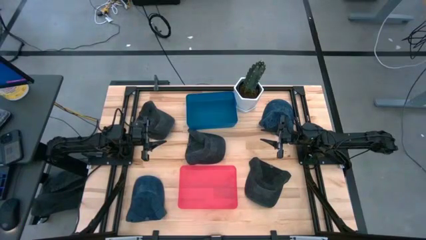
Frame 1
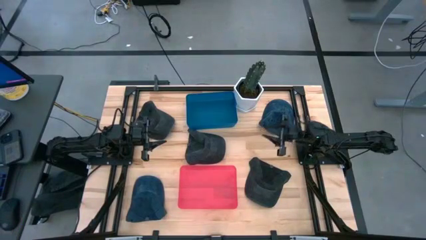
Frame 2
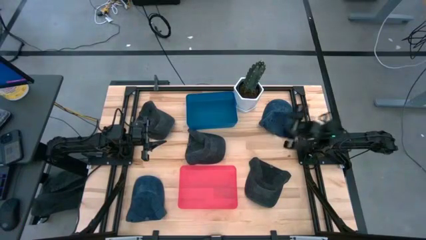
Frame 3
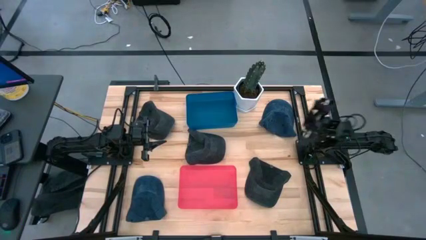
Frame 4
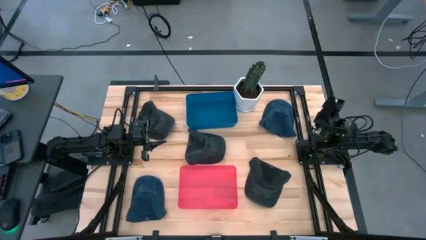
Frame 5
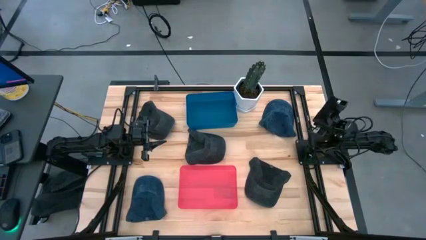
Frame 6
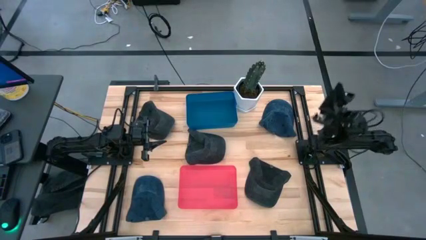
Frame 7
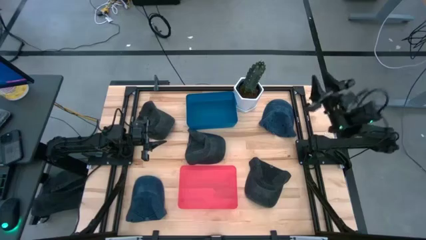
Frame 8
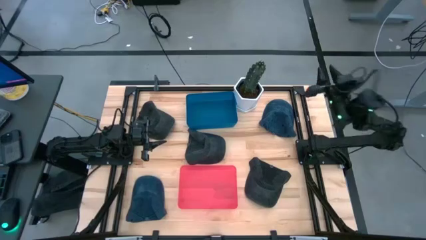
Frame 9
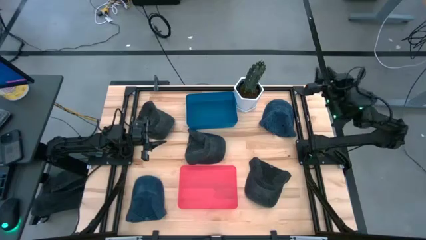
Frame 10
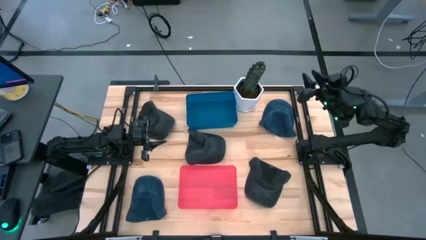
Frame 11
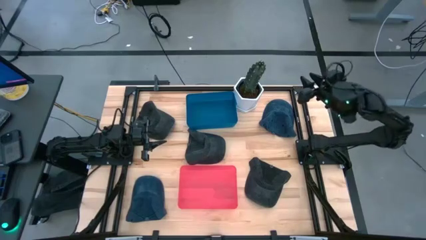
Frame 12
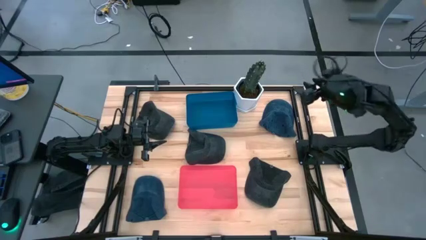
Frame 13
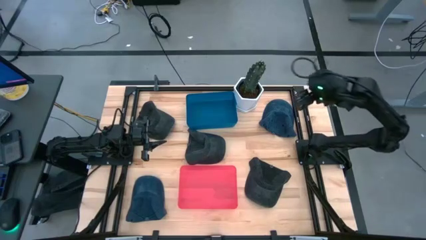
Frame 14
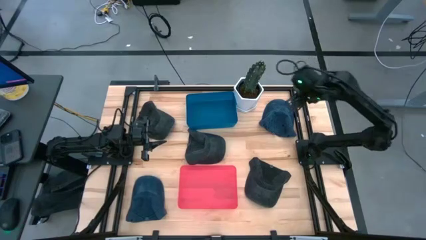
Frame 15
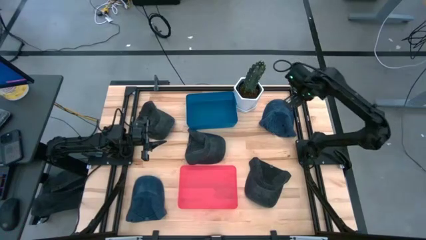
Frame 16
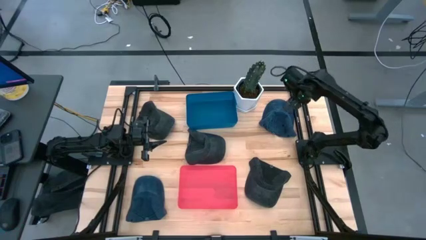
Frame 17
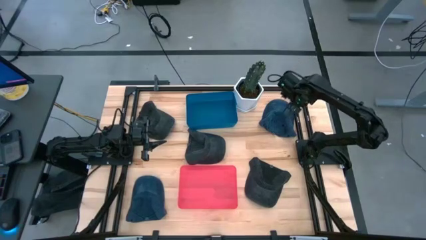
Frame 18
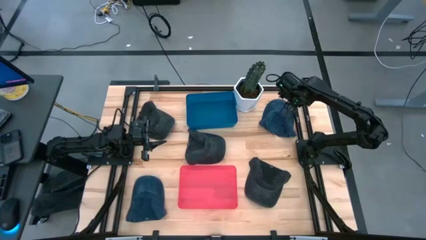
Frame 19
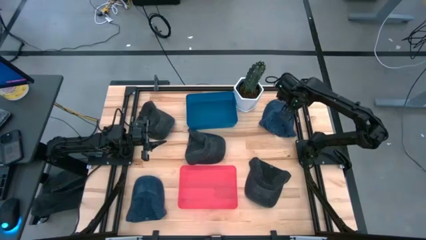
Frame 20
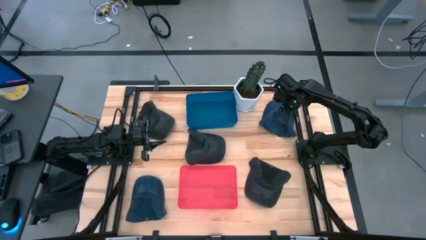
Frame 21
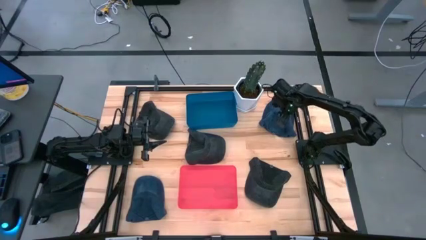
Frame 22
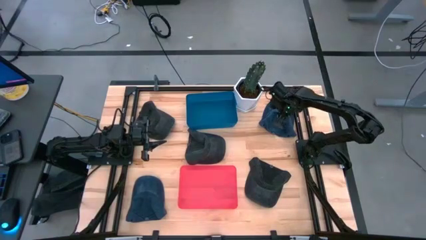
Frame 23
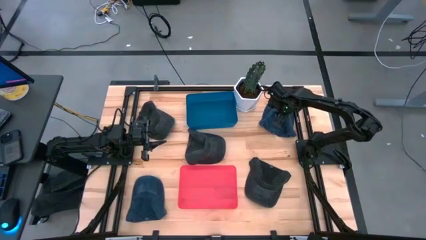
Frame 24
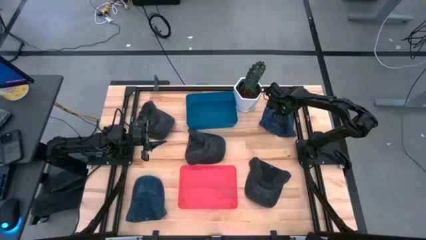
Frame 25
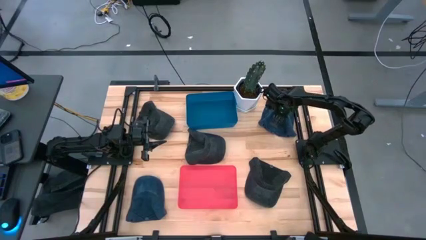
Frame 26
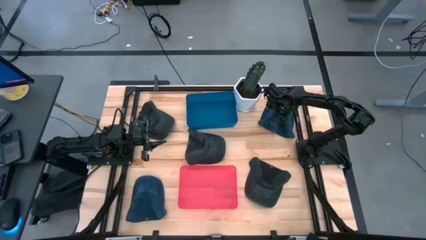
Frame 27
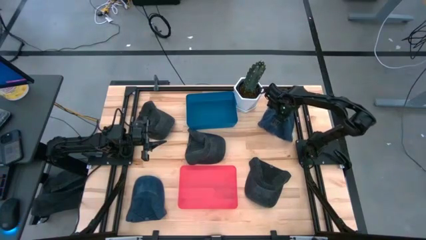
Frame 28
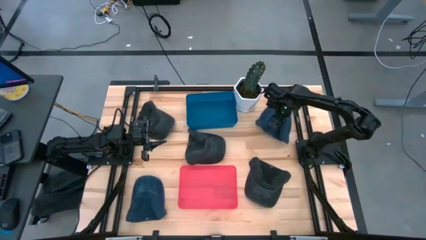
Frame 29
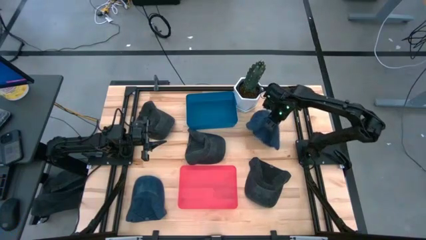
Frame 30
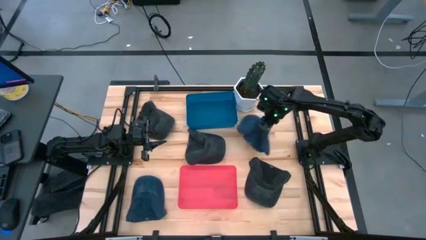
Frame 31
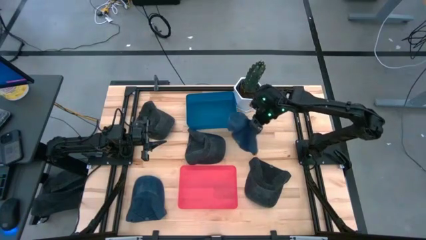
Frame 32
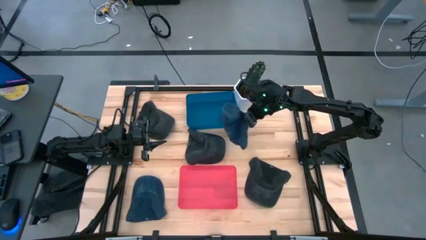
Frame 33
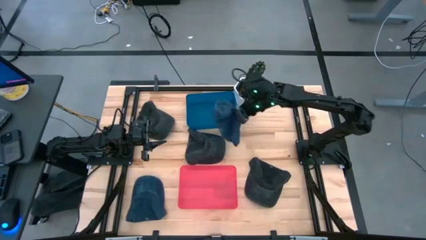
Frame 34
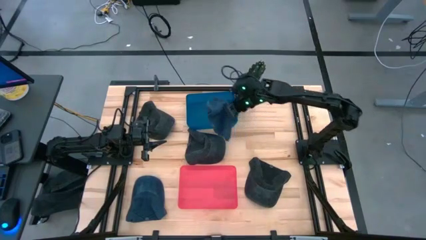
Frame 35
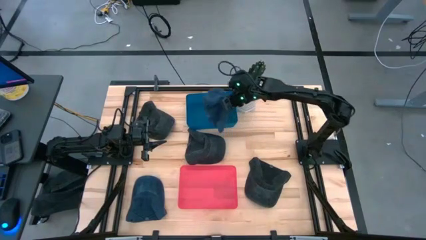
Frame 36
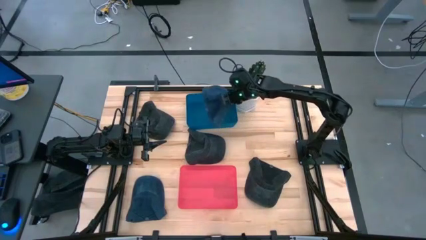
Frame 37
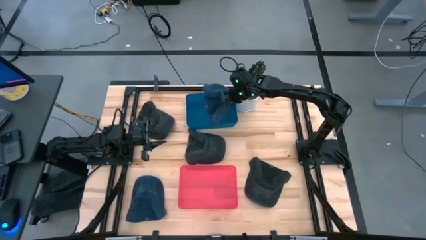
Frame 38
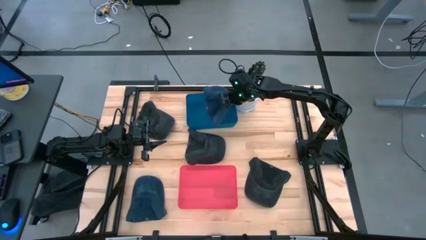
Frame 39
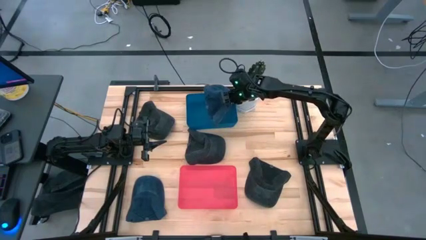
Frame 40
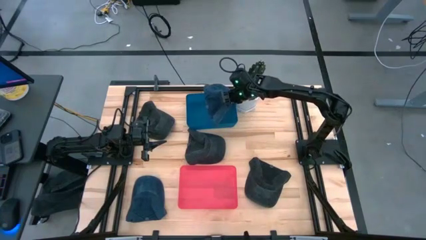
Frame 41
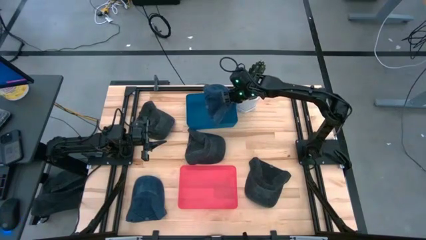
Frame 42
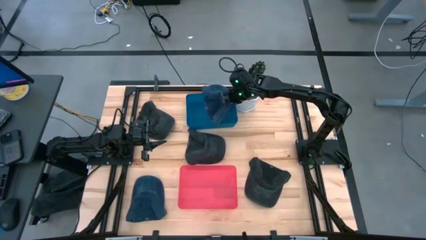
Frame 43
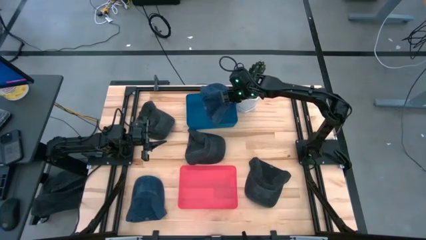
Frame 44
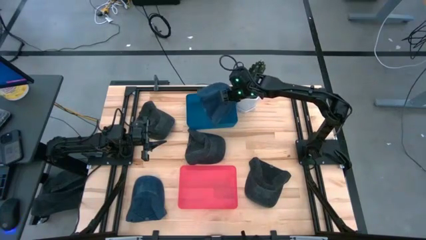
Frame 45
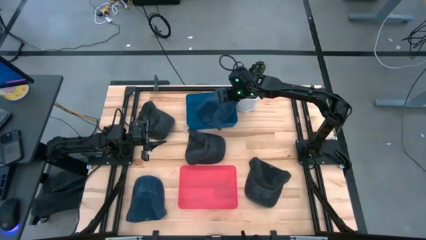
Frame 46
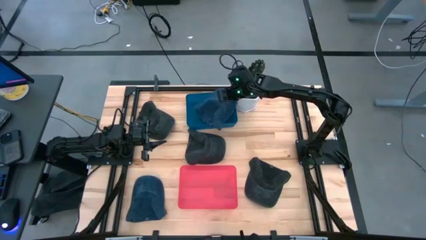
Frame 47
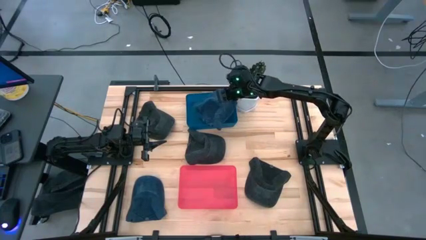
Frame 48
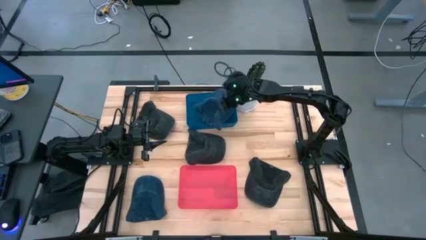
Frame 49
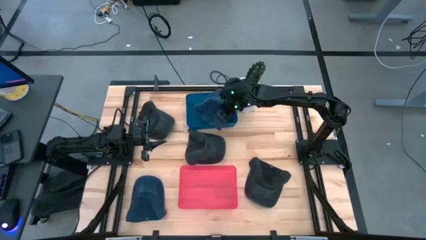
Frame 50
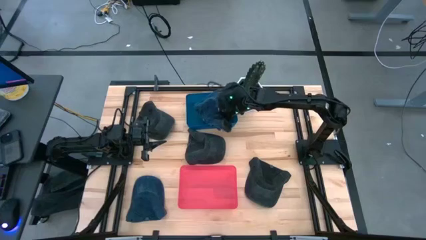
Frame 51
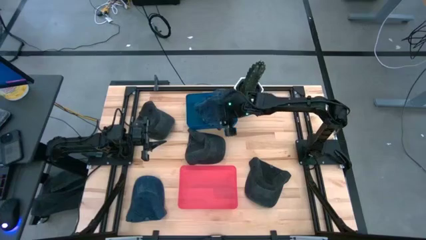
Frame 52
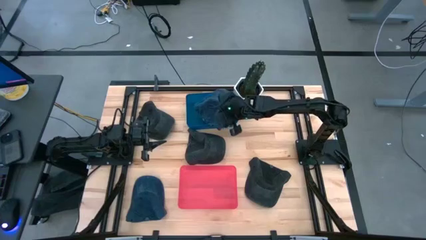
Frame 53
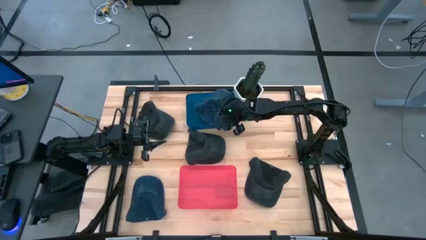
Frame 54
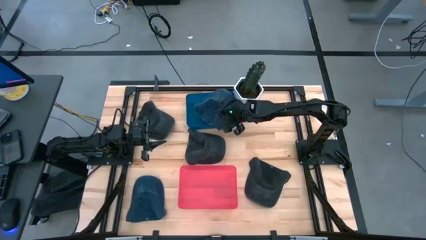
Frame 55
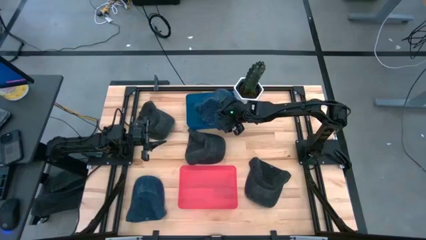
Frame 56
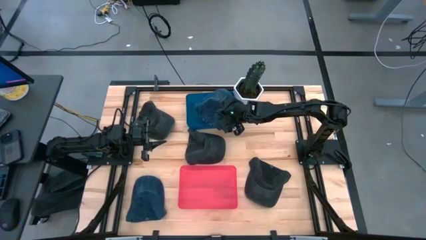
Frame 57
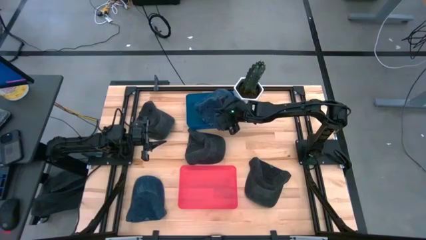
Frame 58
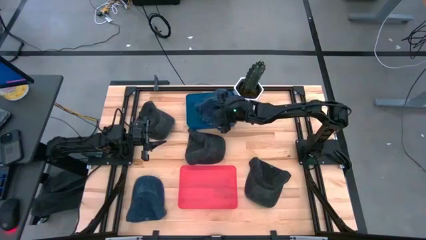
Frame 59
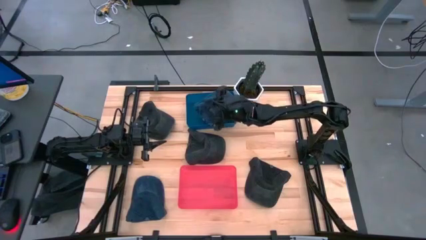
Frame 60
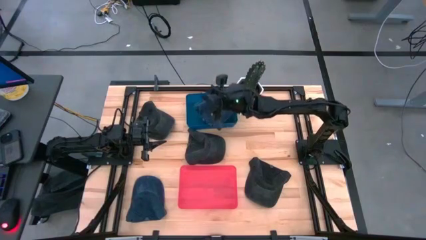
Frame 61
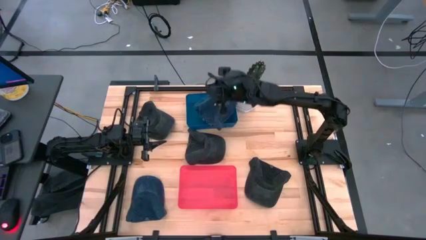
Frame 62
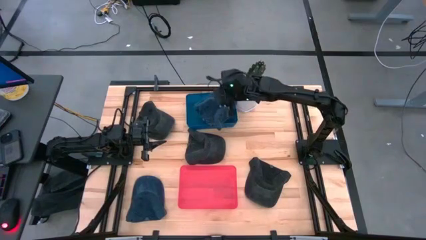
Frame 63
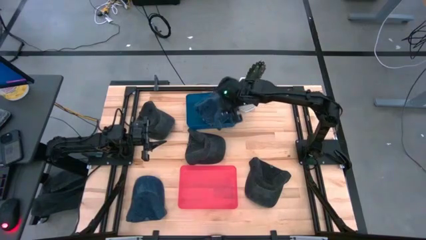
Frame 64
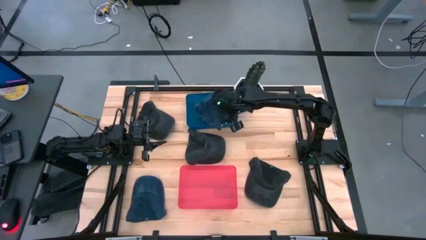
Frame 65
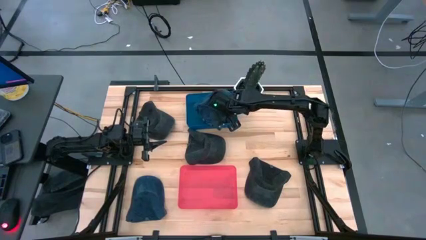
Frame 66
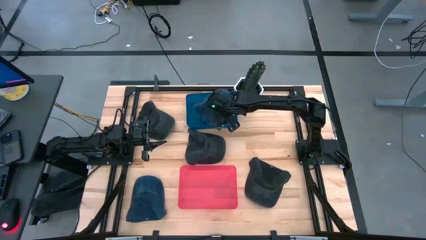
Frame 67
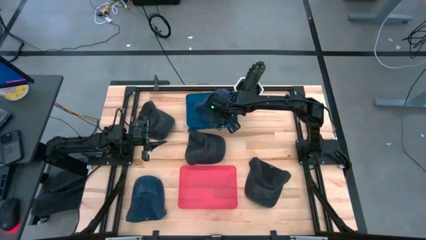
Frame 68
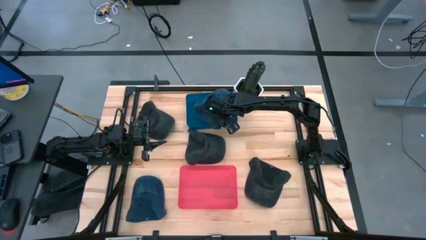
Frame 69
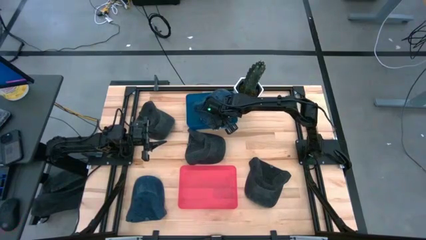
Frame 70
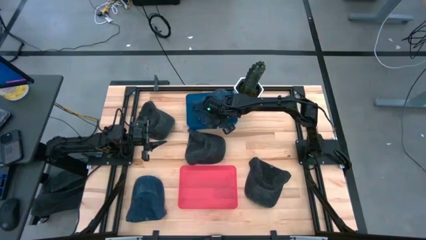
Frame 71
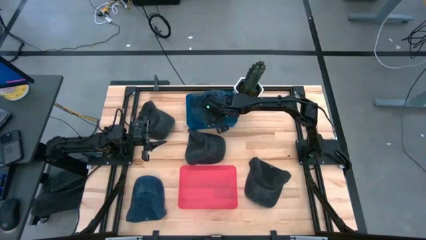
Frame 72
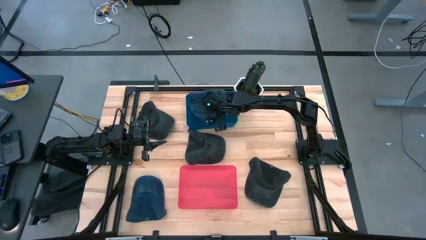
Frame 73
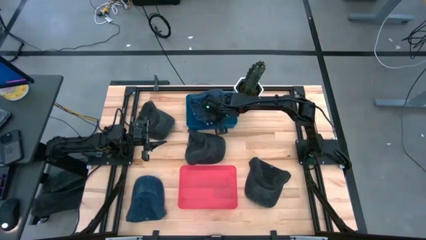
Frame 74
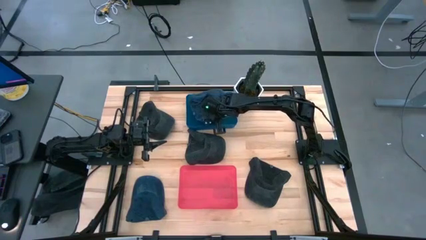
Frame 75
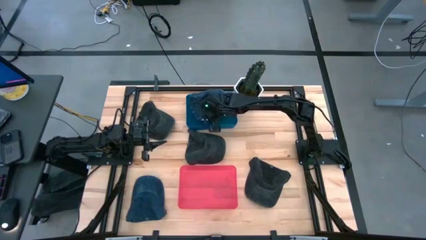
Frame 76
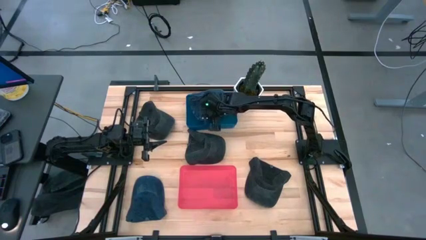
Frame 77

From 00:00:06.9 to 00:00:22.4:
Task: Pick & Place hat
Put the top right blue cap into the blue pin
